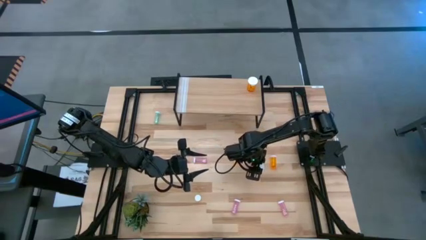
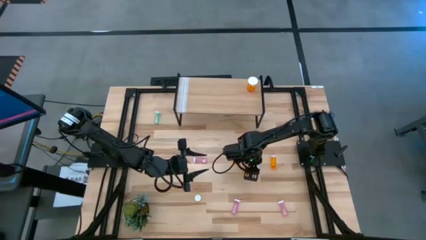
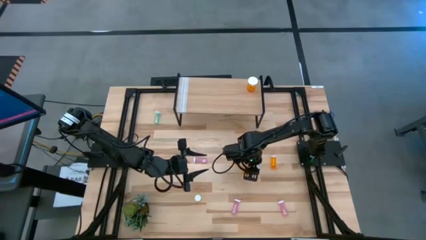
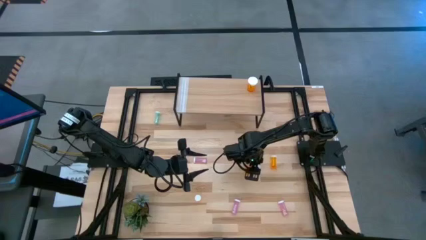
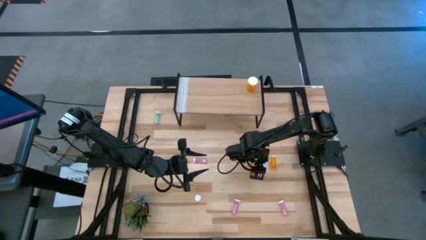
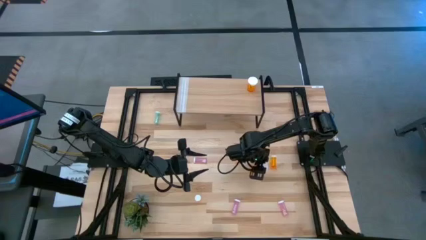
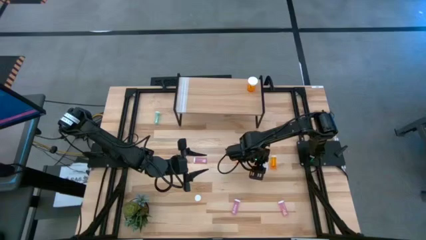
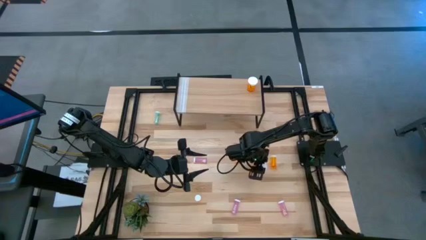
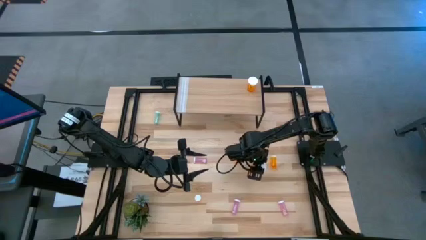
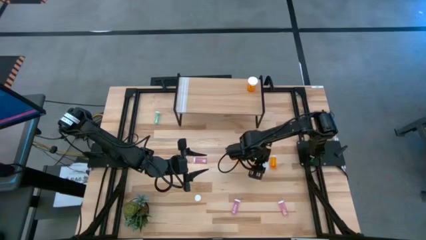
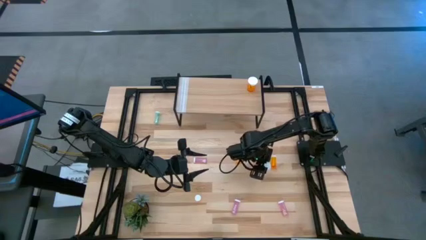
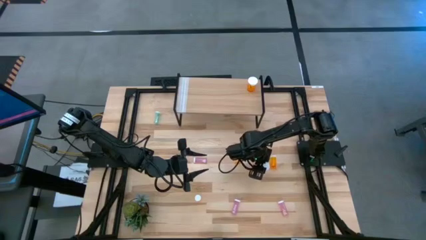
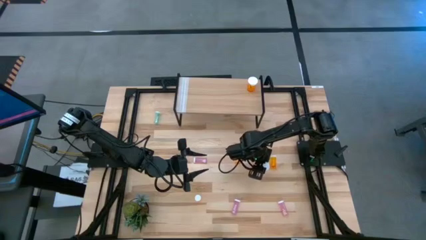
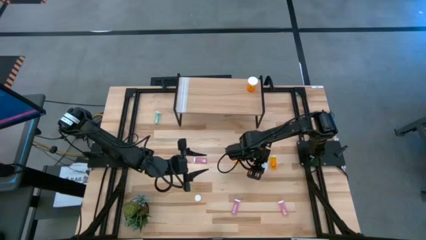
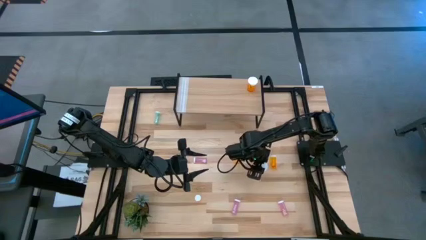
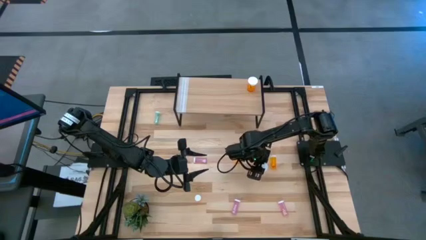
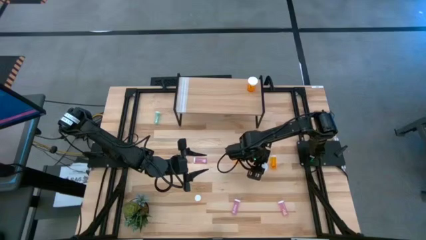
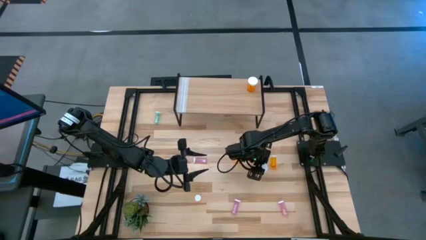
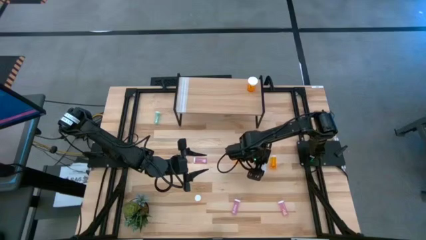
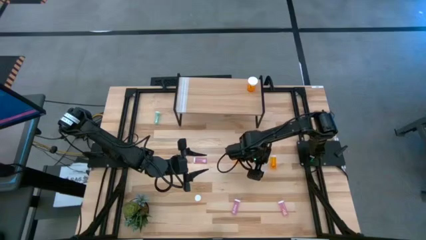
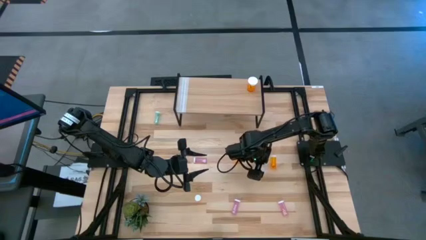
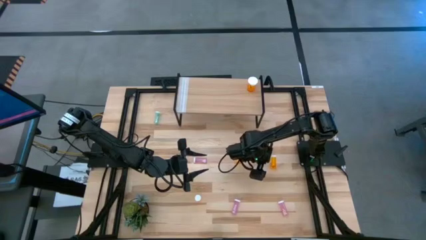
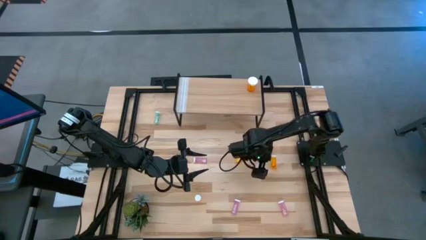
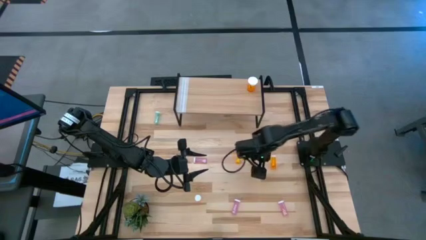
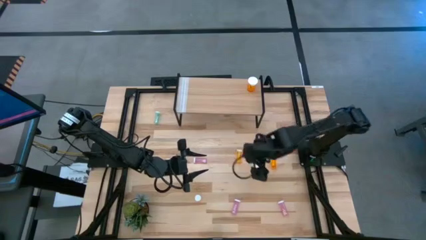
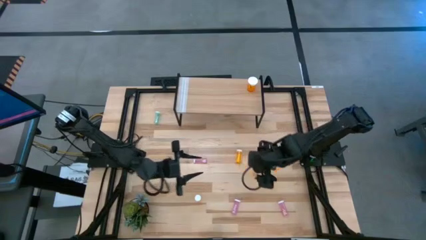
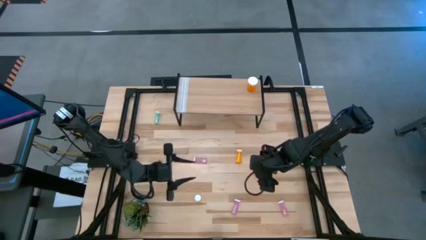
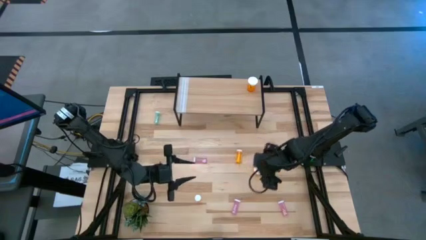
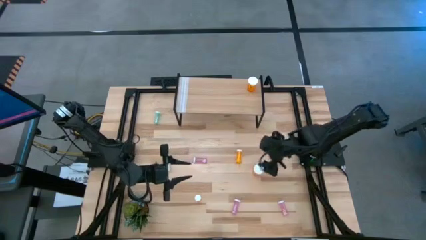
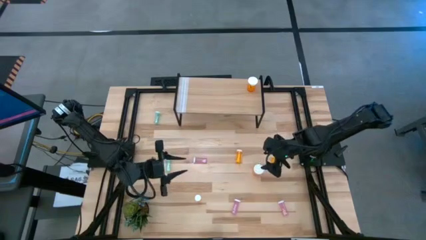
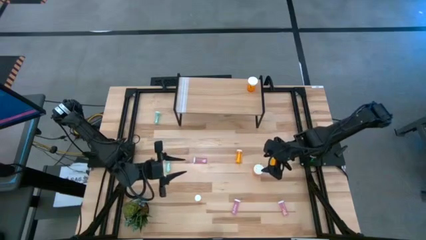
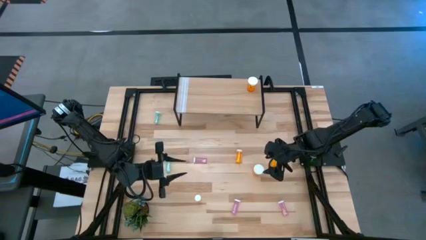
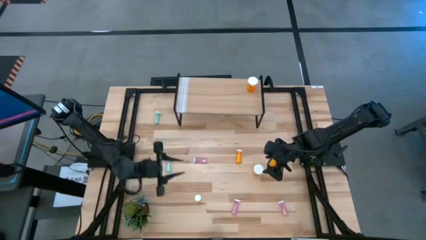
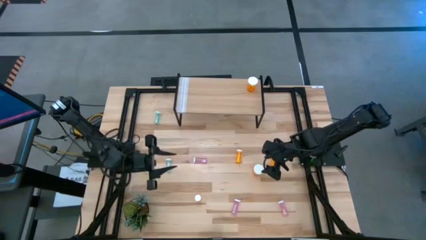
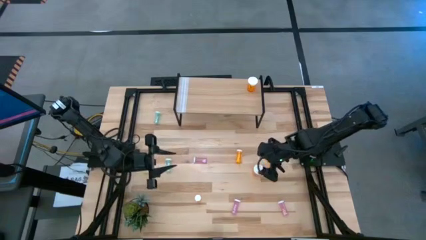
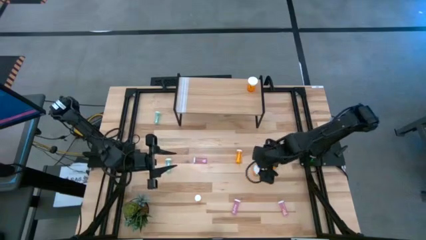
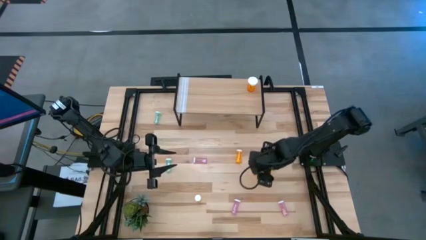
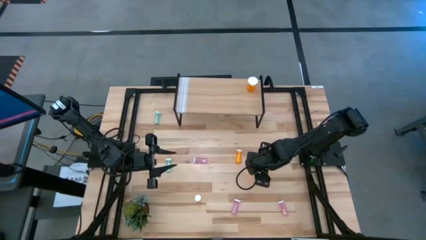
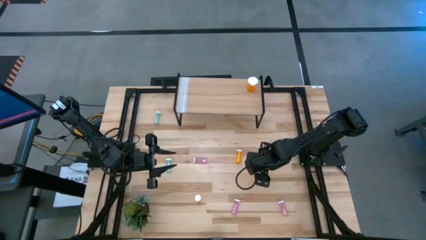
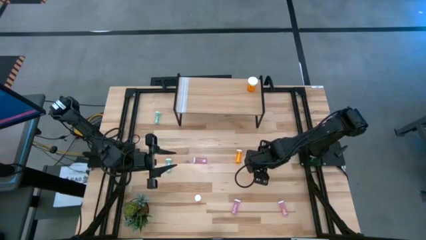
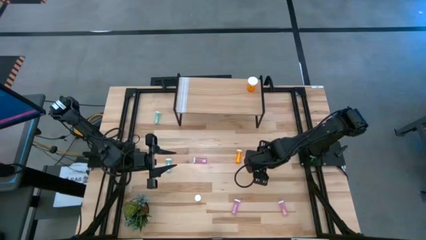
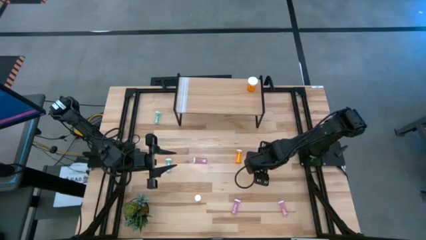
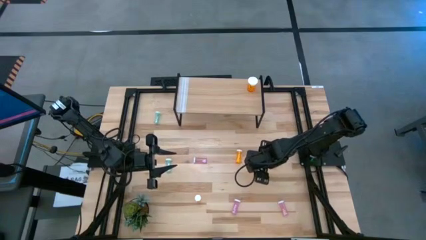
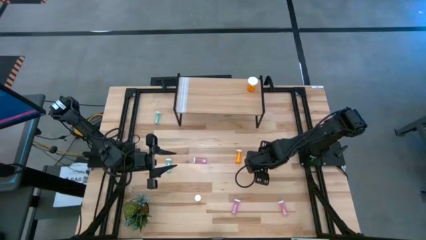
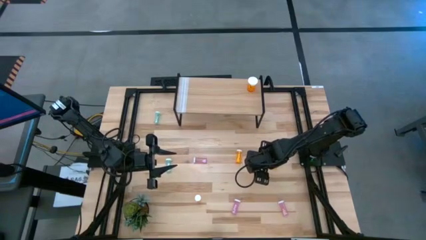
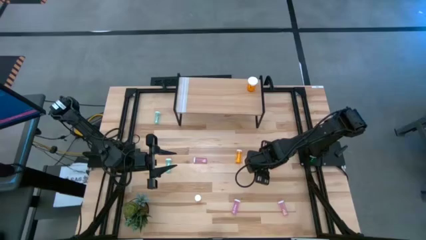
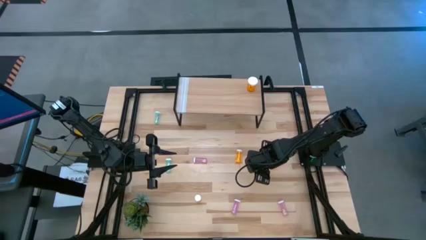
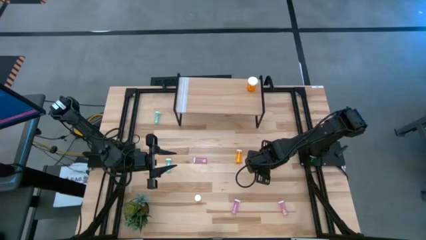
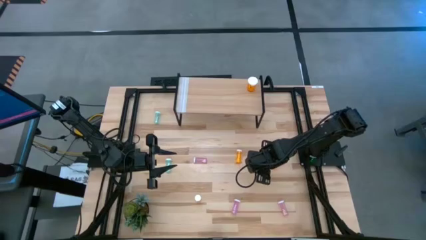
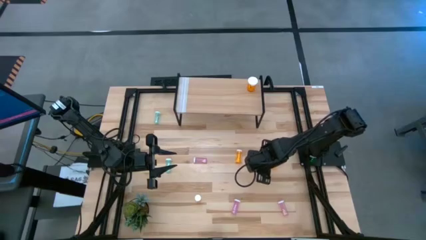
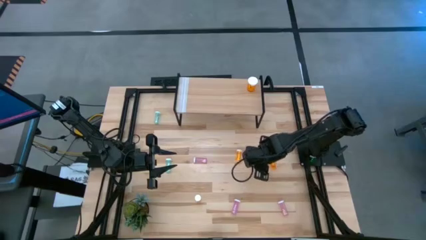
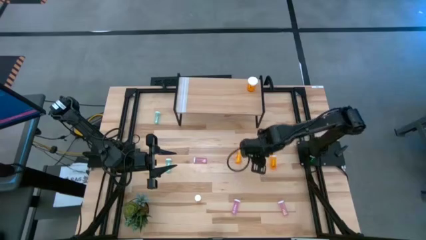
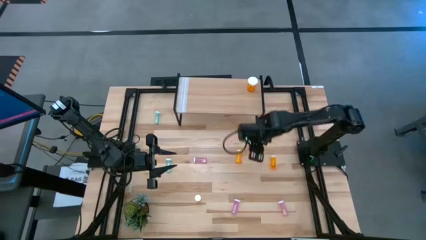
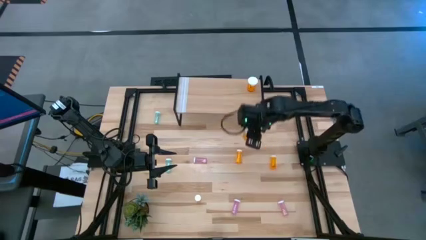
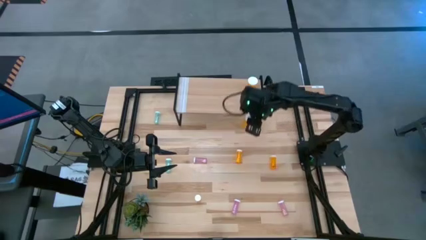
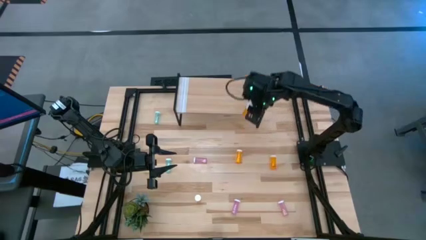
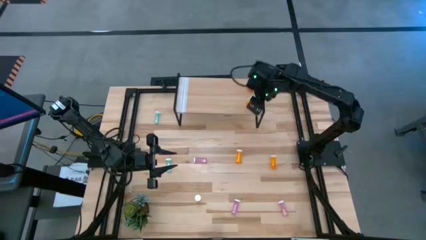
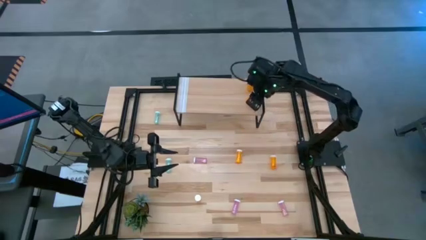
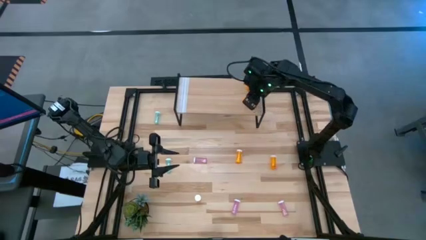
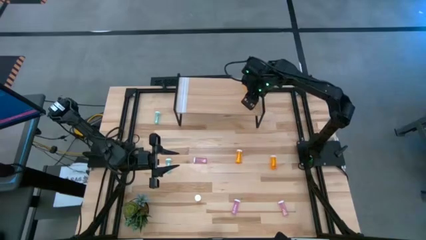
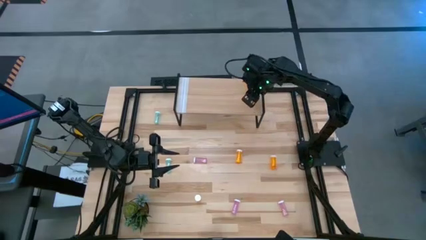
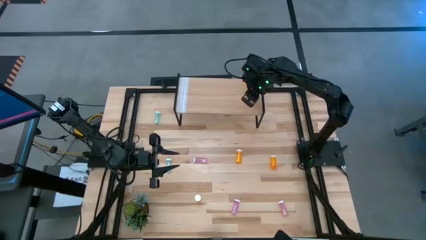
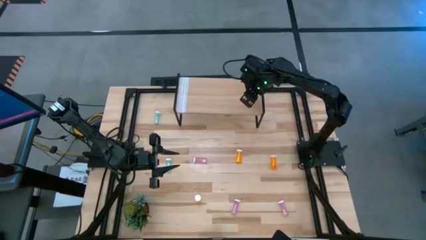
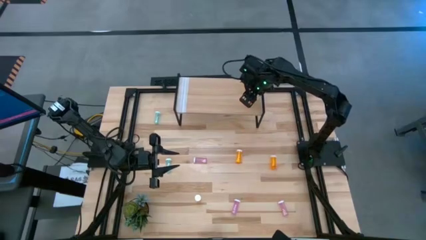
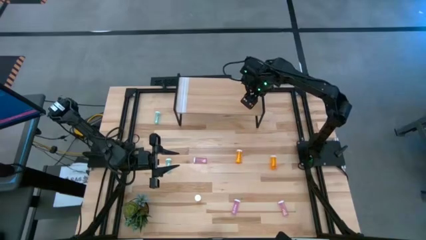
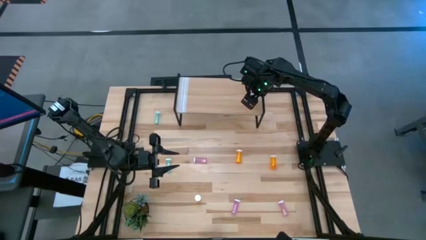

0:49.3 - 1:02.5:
Task: Pick and place medicine bottles onto shelf by color
Put the large orange pill bottle on the shelf aligned with the other large orange pill bottle
